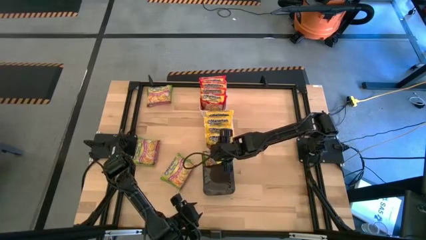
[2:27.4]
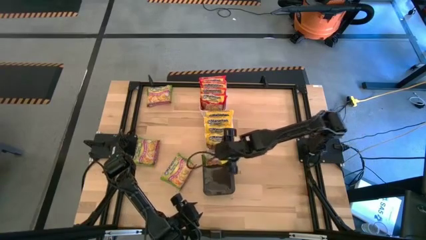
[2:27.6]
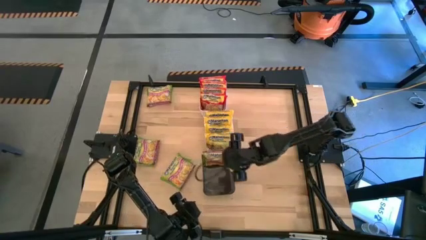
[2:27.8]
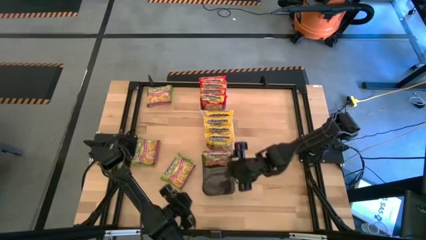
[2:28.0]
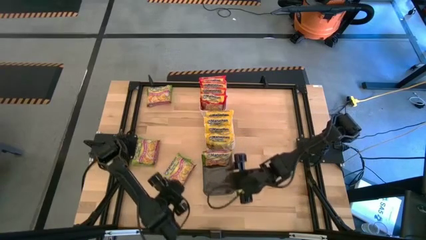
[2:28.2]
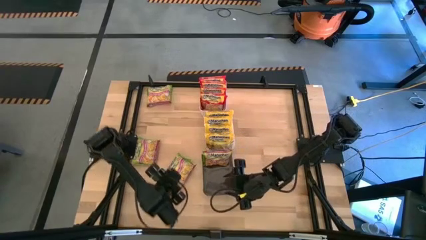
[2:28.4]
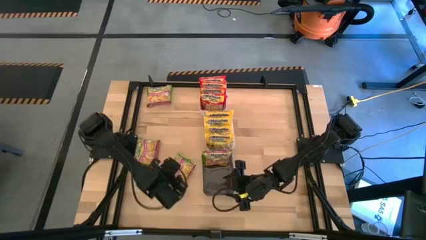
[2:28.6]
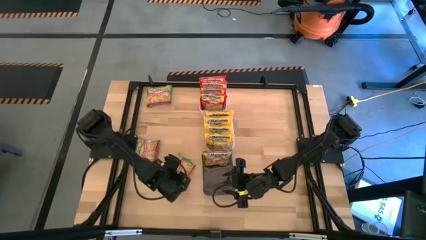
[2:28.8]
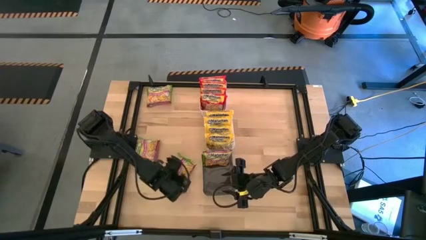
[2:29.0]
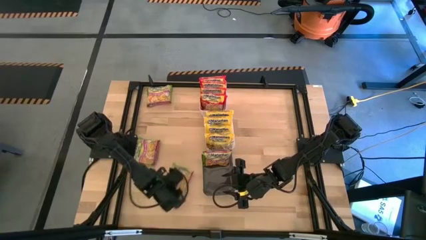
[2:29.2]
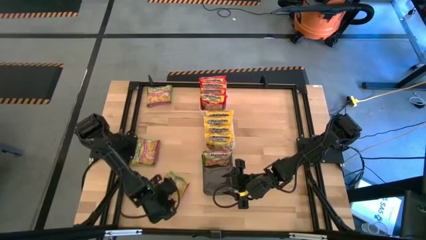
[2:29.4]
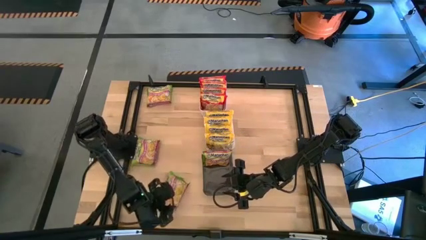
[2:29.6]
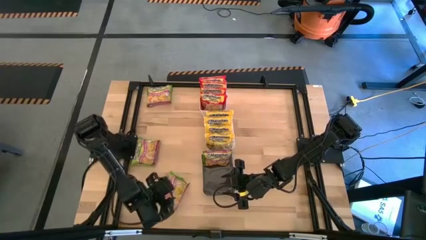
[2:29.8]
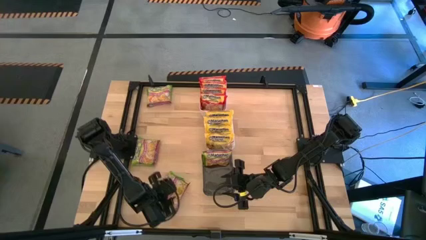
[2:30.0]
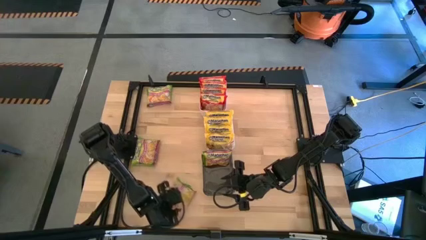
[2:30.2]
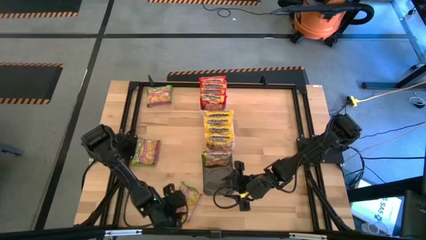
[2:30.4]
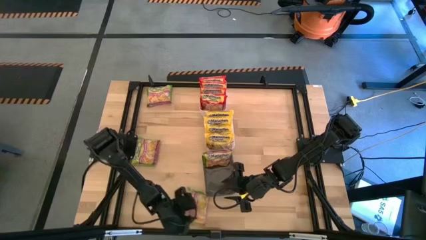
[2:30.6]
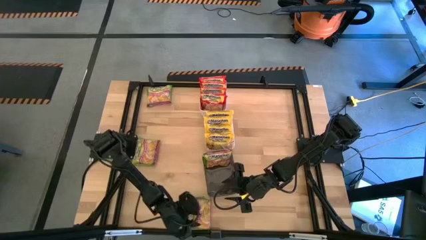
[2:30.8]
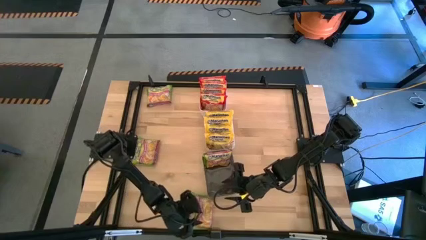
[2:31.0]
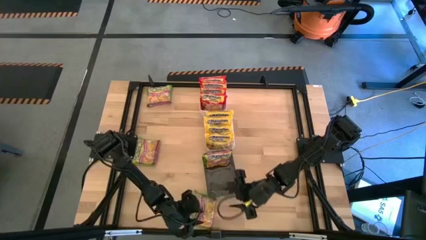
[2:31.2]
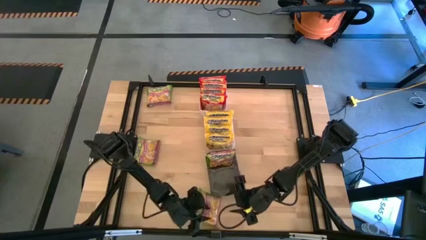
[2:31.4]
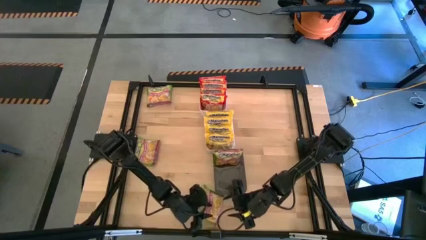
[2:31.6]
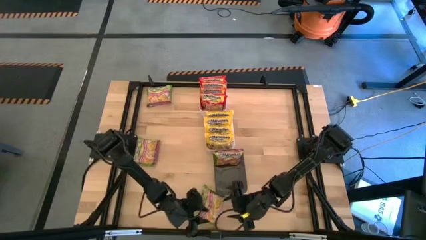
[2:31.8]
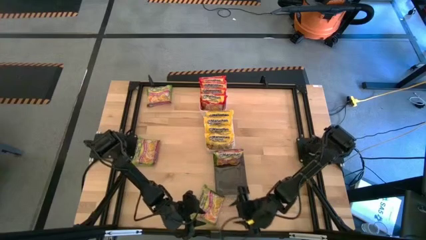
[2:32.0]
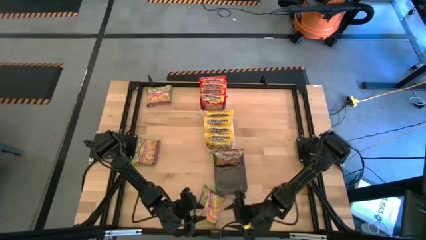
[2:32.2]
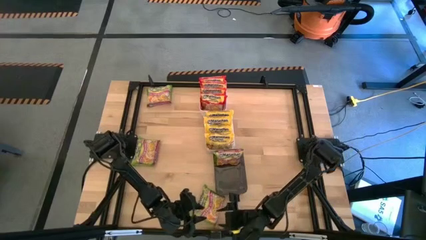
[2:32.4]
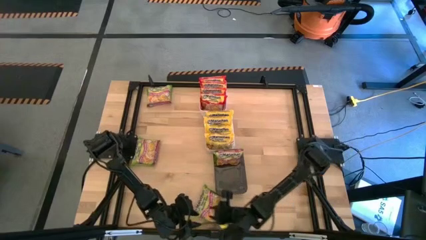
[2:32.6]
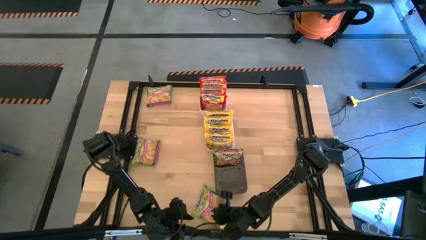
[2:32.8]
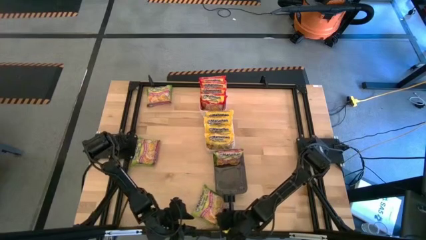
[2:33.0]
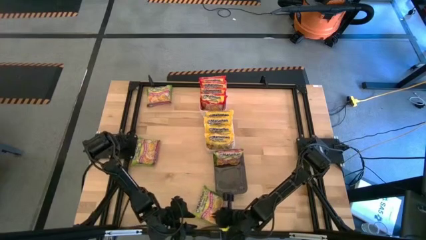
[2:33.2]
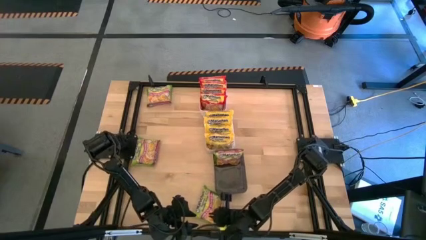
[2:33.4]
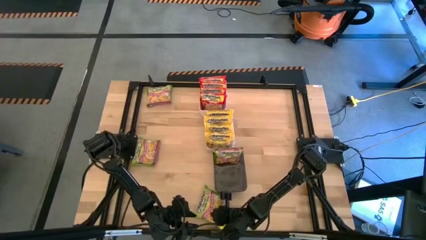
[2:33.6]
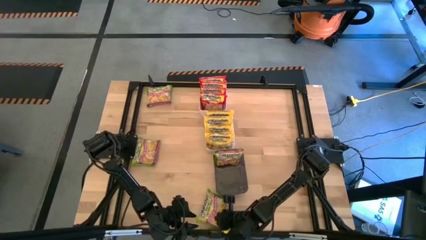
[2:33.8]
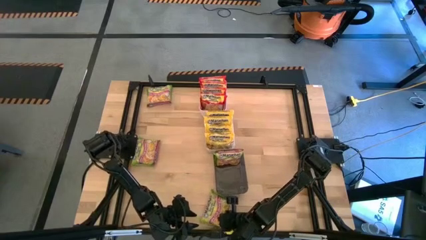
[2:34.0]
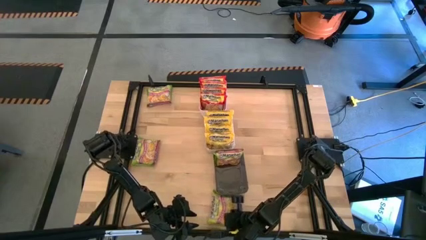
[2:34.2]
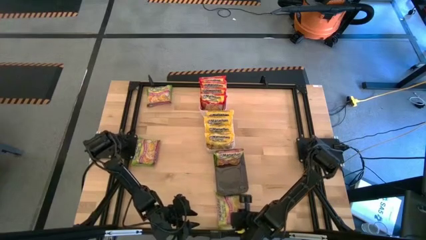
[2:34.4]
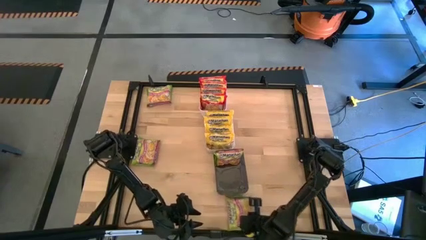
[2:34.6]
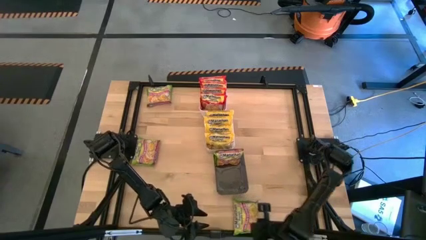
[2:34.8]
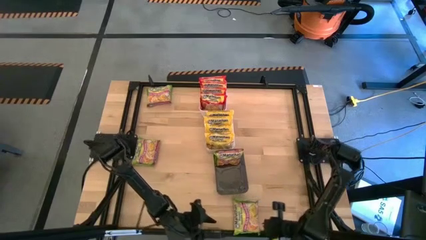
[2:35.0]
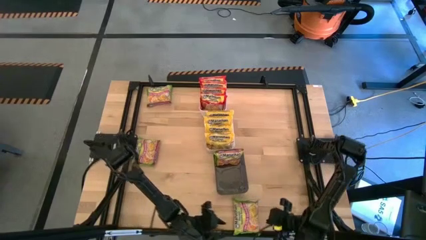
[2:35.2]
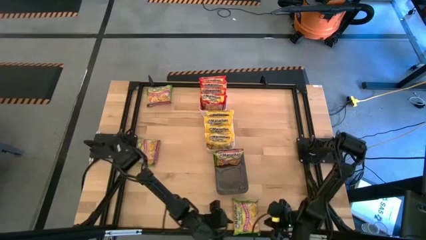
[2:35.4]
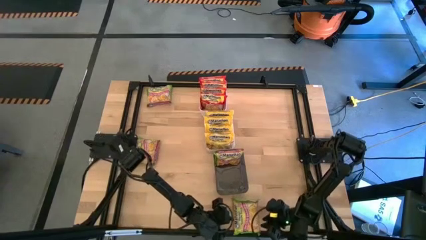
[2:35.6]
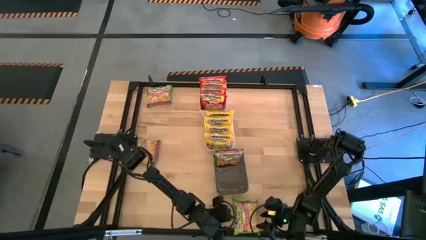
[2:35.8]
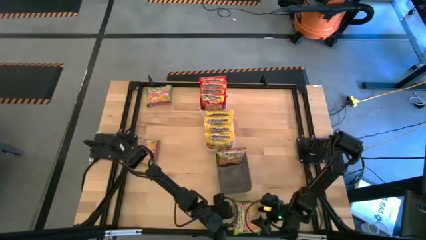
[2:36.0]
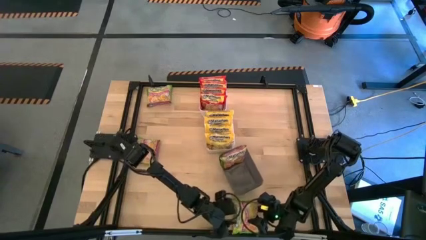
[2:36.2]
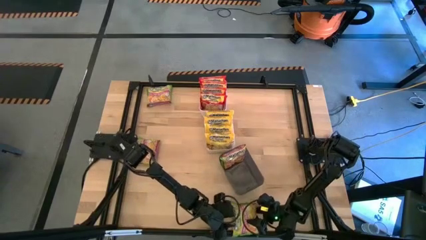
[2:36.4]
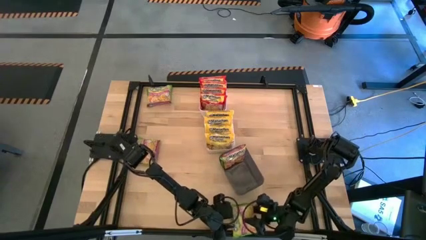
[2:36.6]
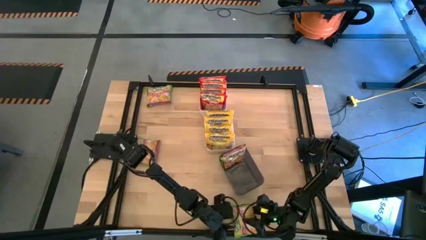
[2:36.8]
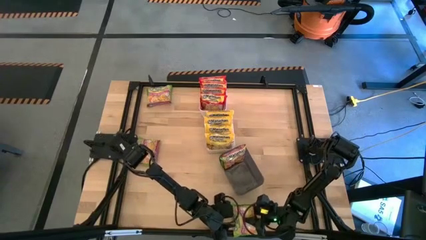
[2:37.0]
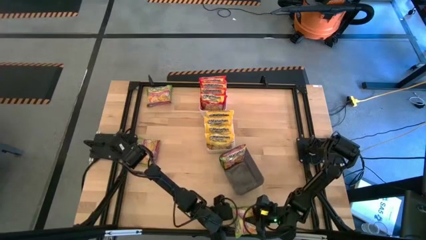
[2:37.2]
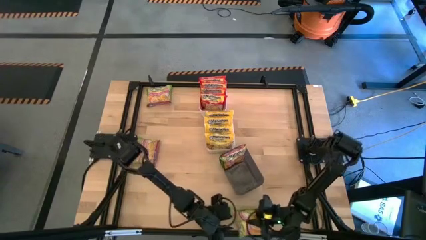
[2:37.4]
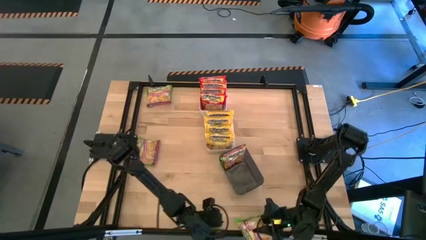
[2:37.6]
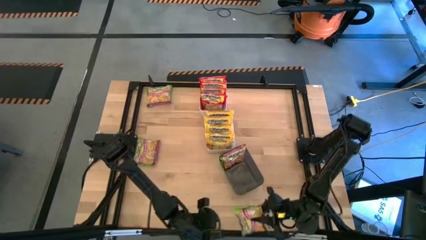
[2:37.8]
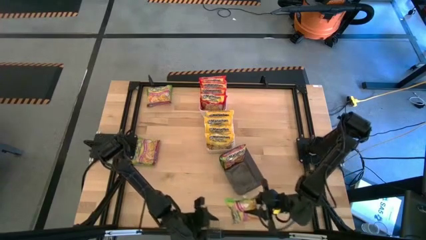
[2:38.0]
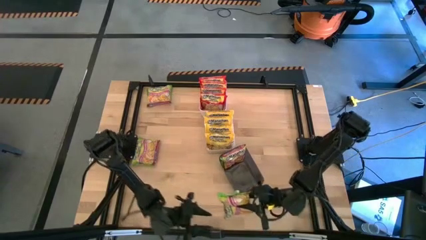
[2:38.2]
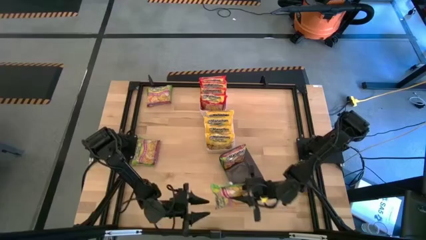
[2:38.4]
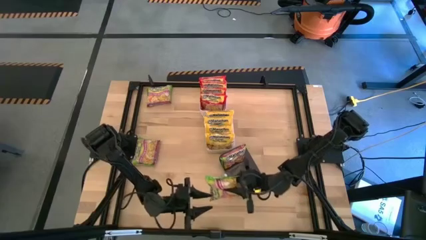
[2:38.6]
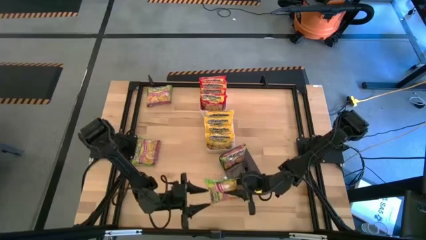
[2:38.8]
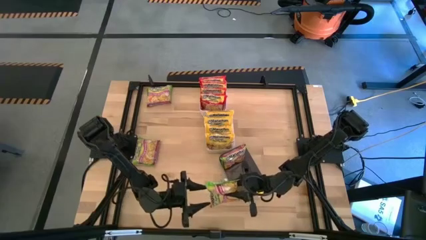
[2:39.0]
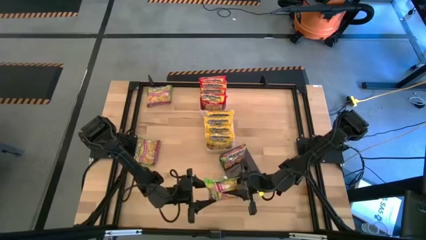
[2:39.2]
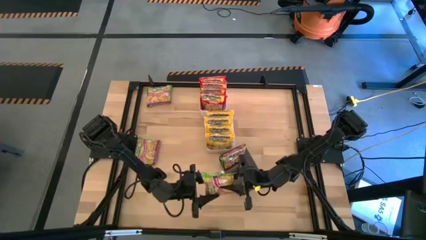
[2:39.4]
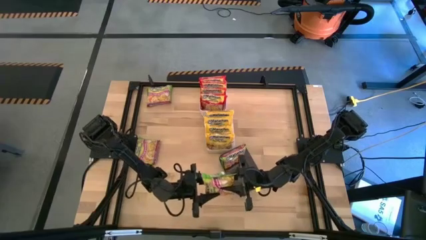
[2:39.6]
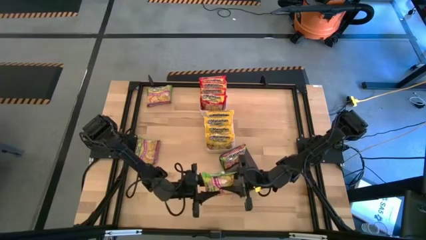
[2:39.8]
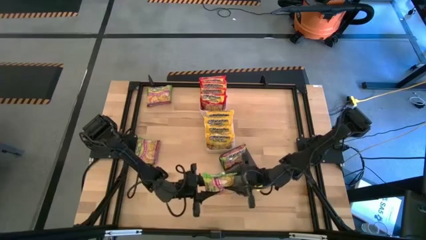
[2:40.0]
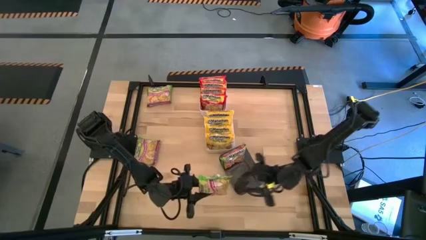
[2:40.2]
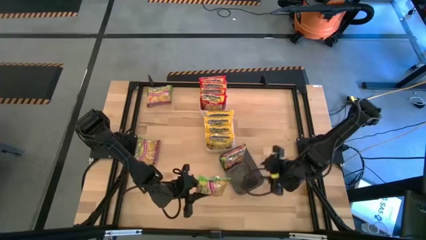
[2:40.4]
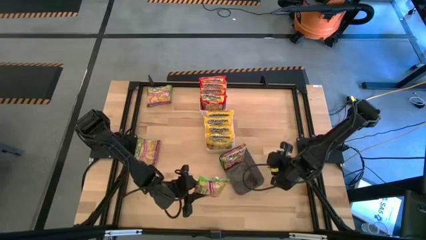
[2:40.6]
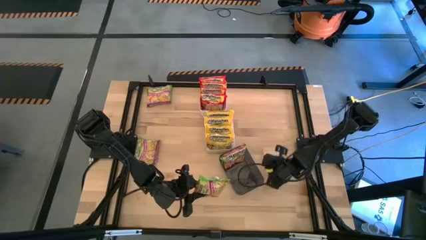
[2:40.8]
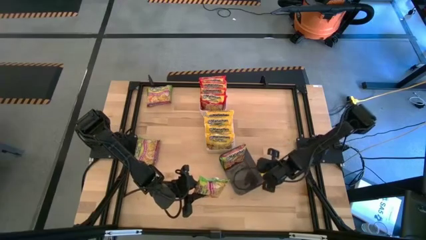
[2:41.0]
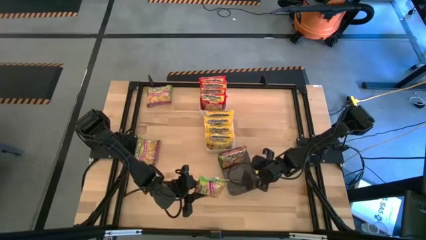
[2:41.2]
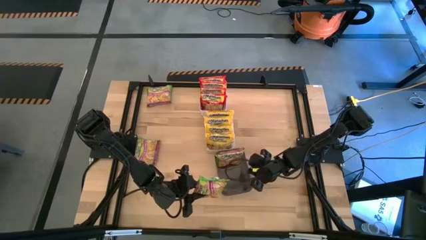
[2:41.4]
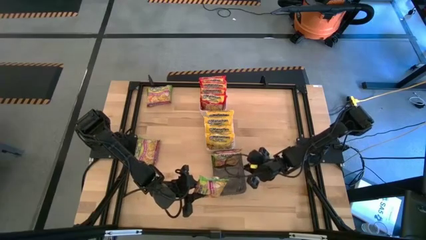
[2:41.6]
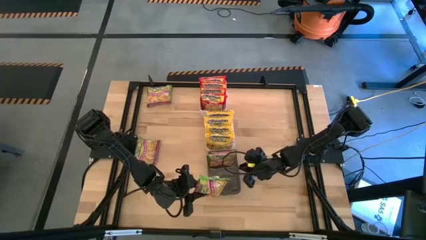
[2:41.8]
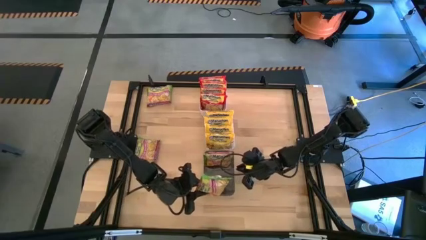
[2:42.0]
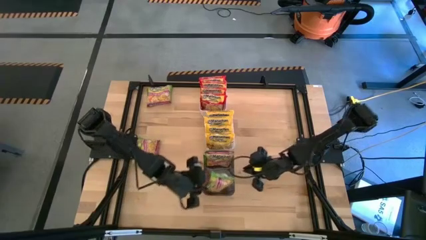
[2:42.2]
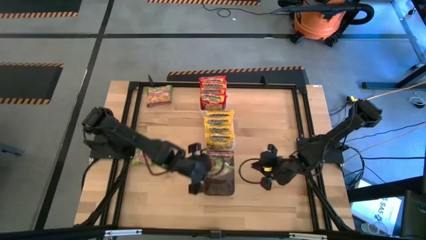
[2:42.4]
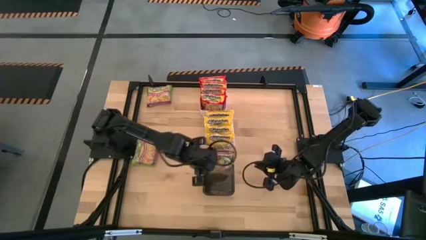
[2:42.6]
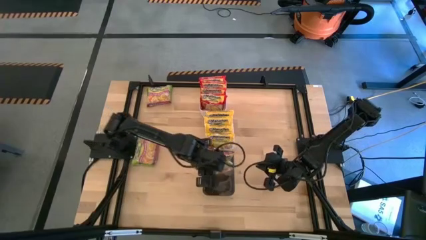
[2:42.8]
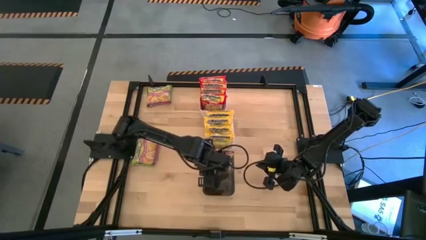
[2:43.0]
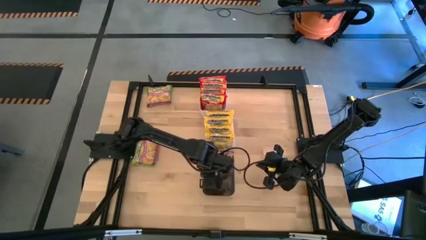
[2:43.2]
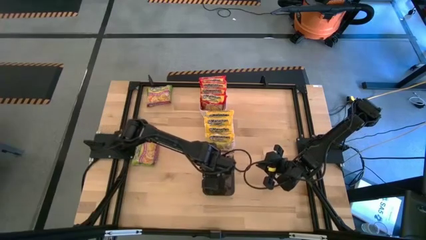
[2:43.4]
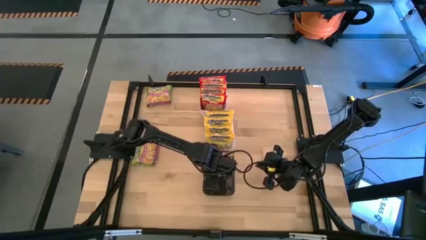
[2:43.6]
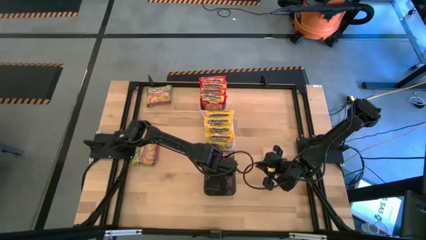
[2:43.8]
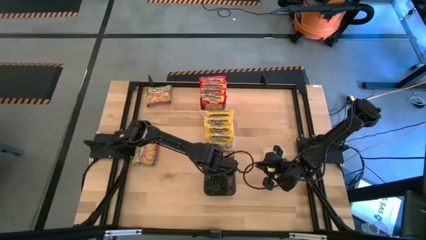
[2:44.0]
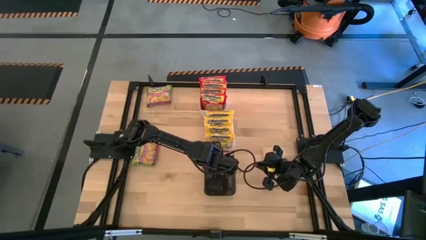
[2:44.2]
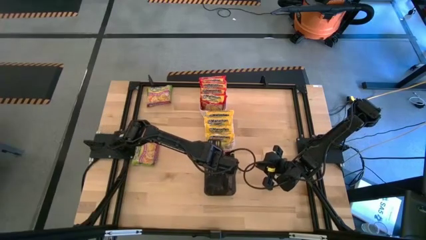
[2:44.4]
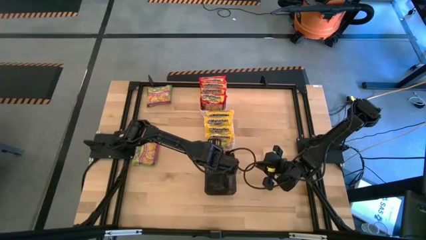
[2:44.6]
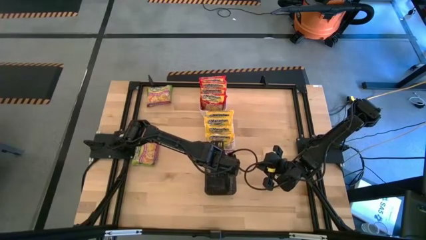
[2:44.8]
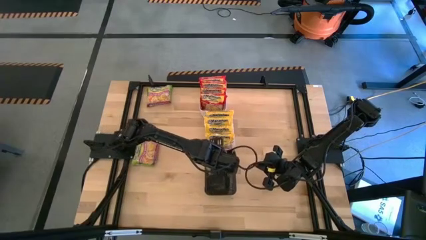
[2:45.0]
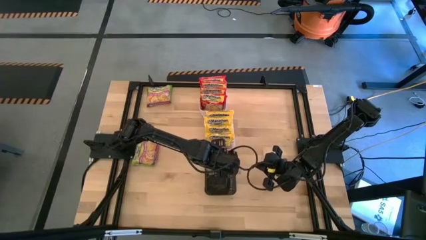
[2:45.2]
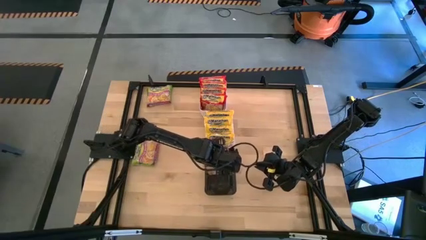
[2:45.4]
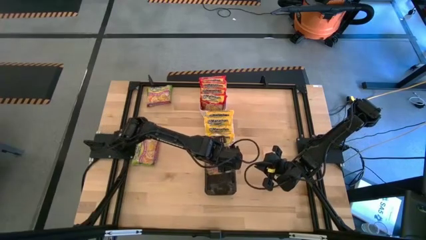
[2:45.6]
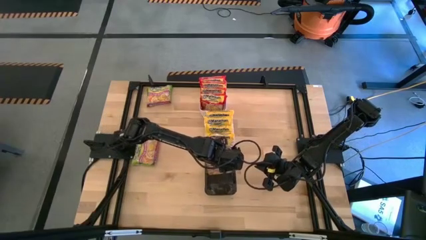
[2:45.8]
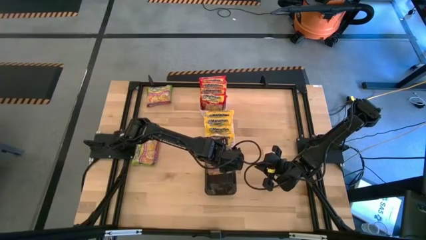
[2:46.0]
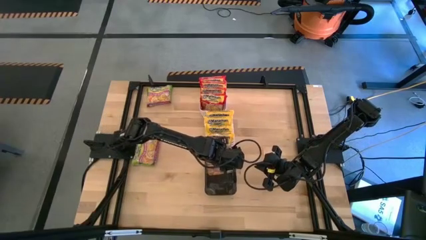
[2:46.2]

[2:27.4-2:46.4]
Task: Sort Maruchan noodles
Put the green noodle pack into the black bin
